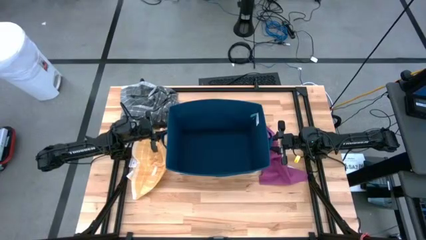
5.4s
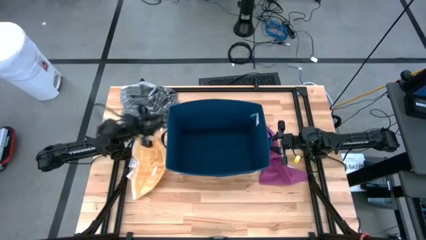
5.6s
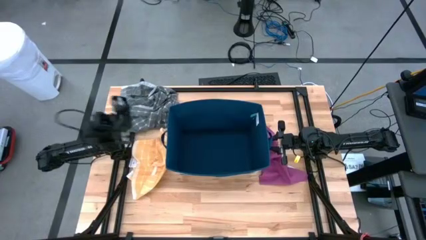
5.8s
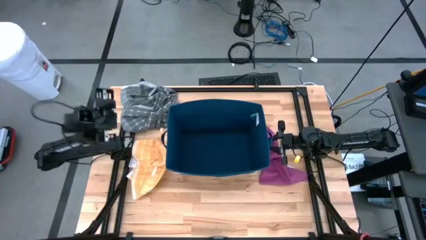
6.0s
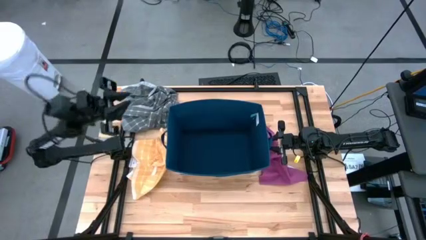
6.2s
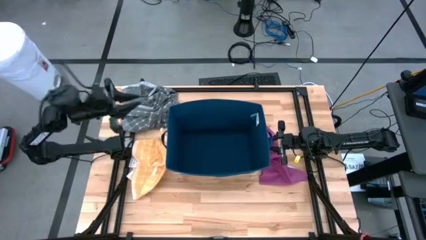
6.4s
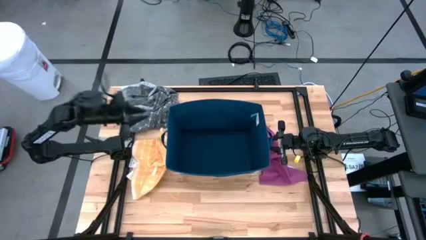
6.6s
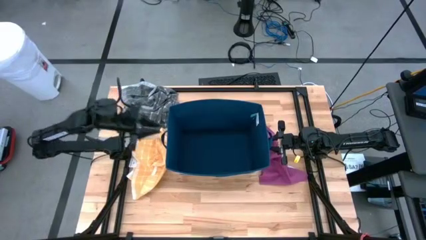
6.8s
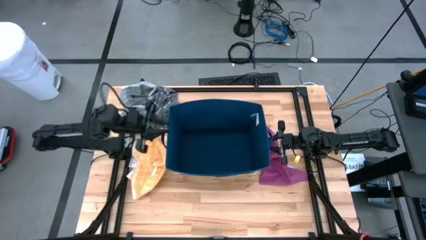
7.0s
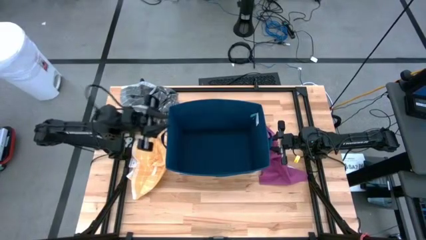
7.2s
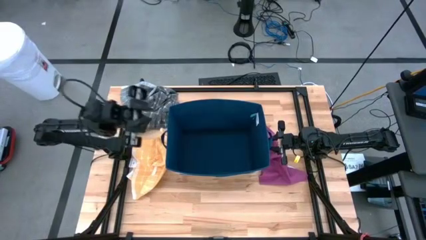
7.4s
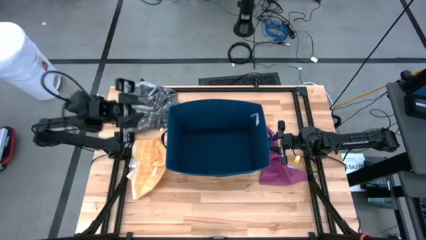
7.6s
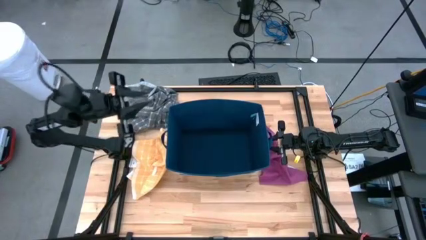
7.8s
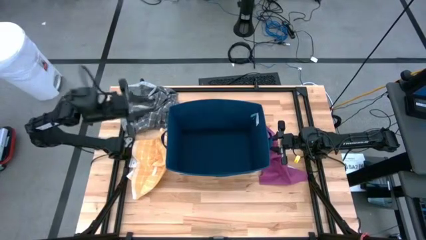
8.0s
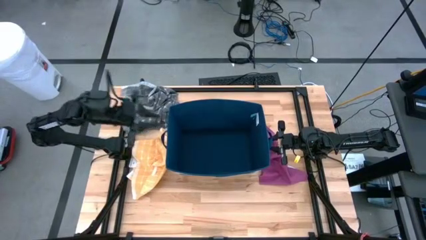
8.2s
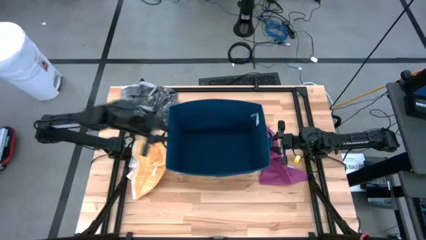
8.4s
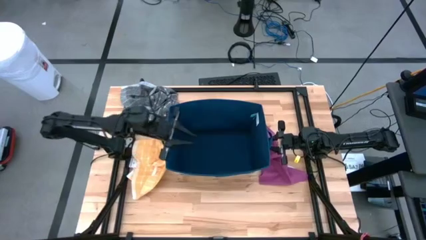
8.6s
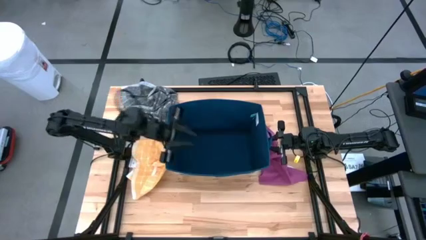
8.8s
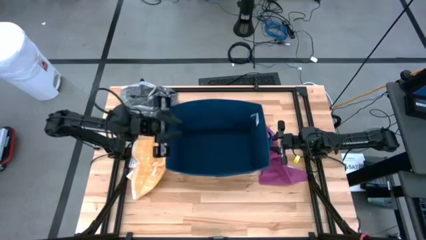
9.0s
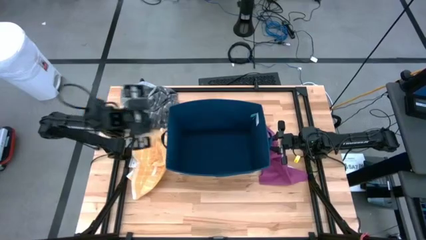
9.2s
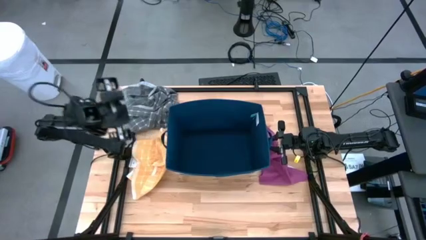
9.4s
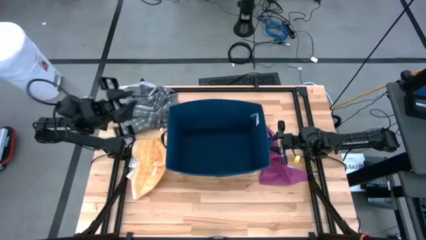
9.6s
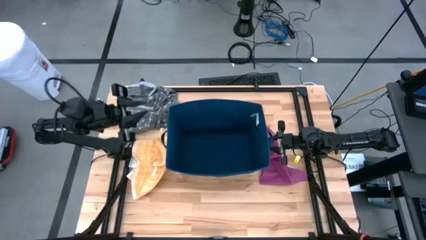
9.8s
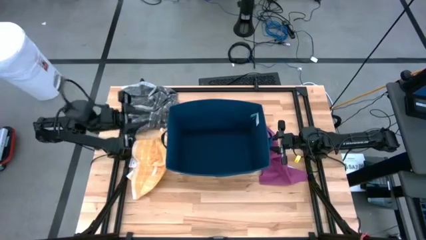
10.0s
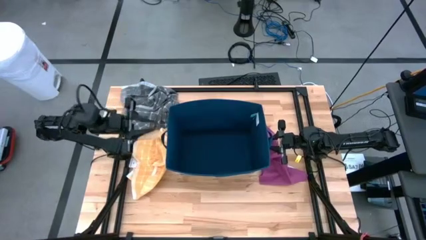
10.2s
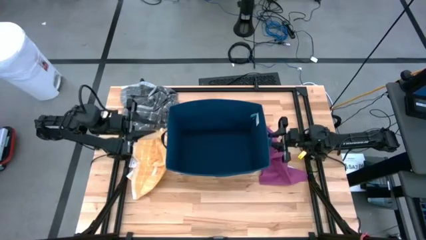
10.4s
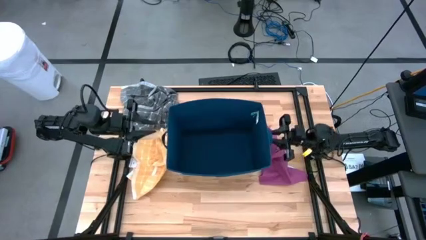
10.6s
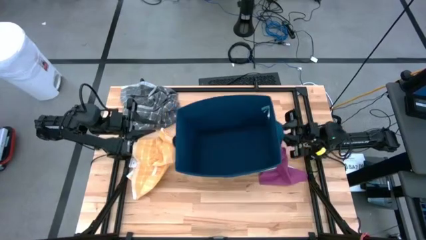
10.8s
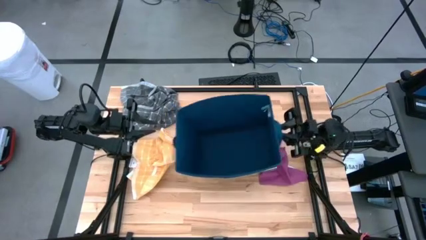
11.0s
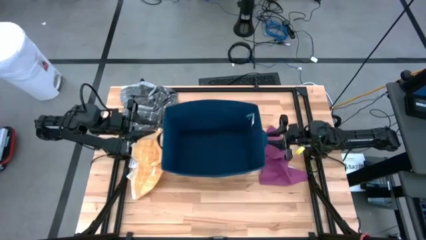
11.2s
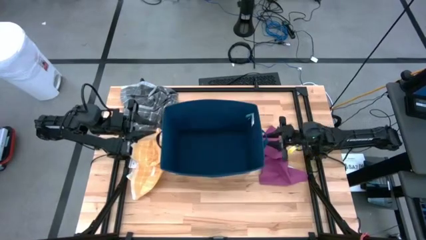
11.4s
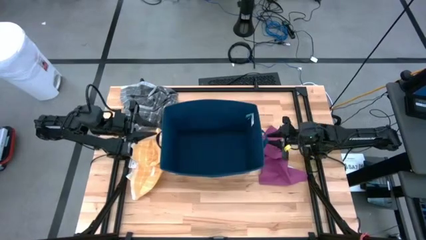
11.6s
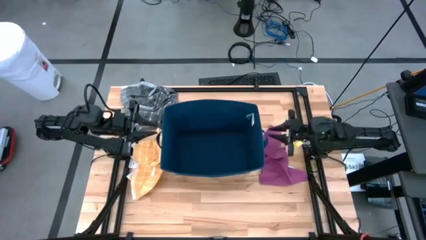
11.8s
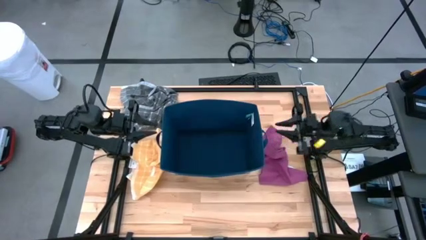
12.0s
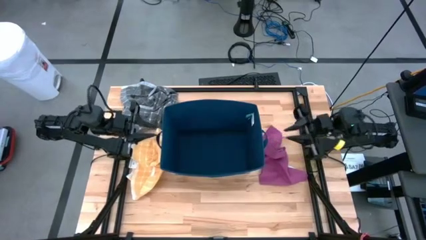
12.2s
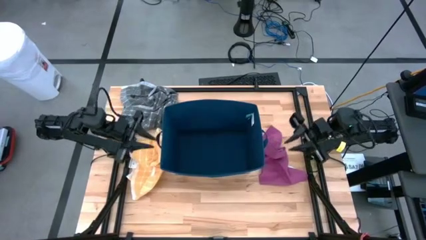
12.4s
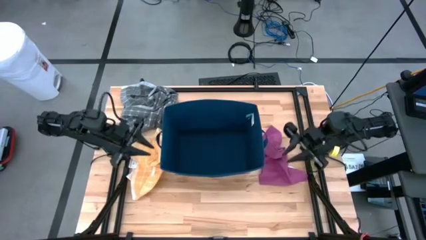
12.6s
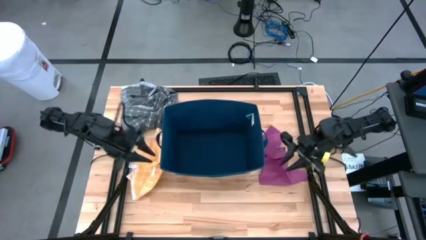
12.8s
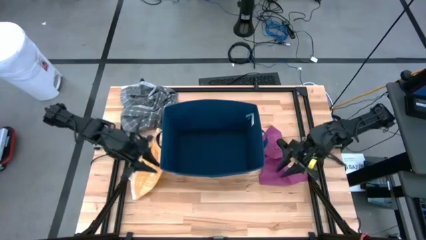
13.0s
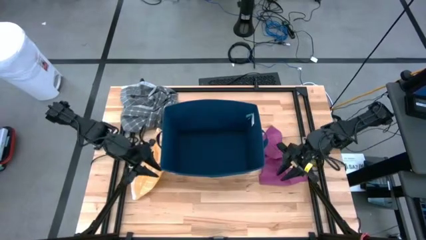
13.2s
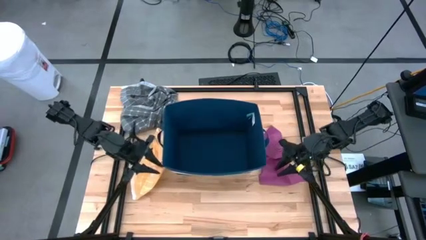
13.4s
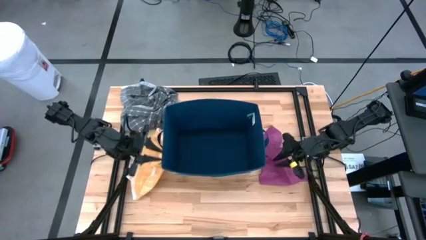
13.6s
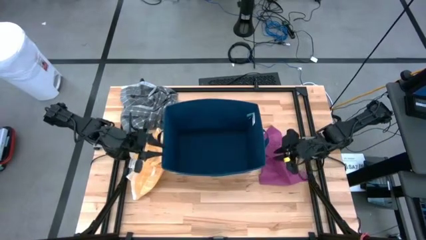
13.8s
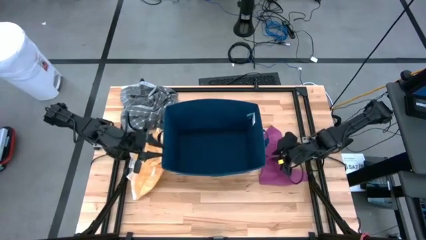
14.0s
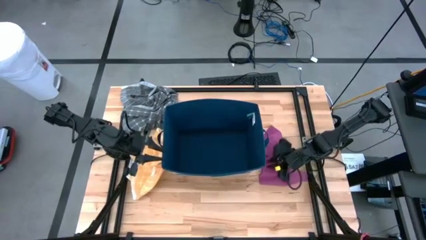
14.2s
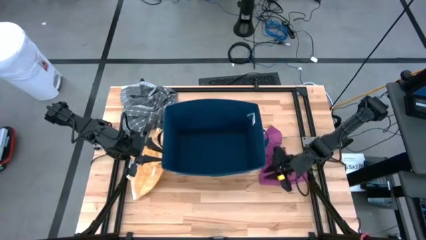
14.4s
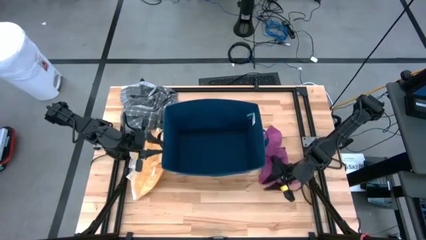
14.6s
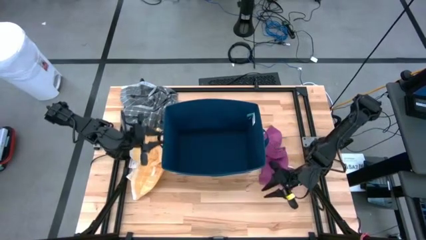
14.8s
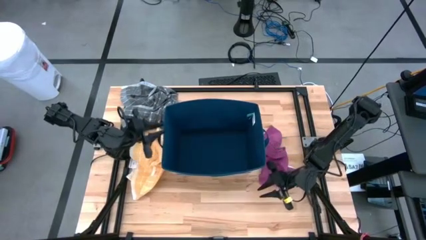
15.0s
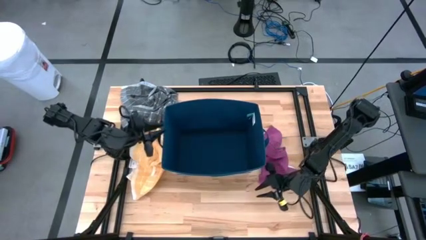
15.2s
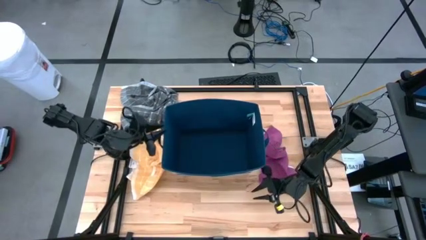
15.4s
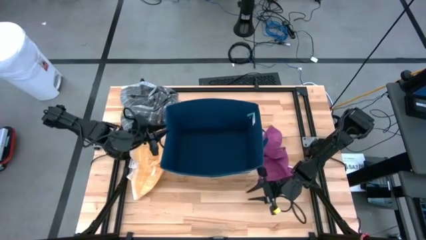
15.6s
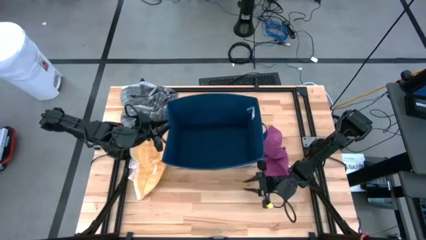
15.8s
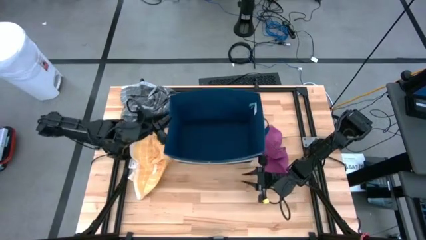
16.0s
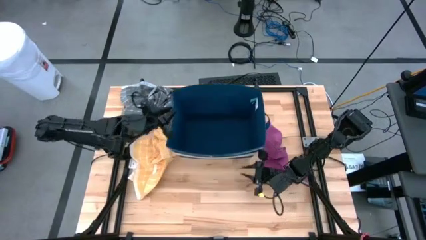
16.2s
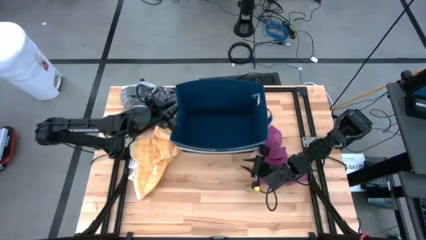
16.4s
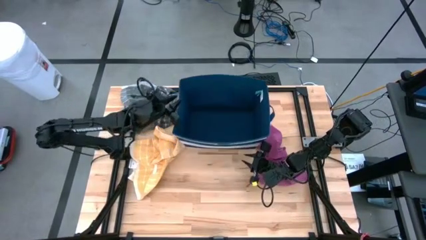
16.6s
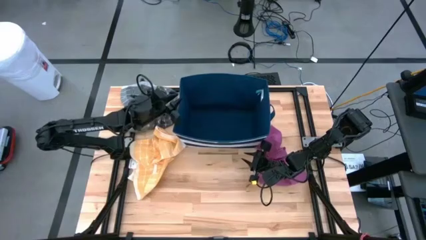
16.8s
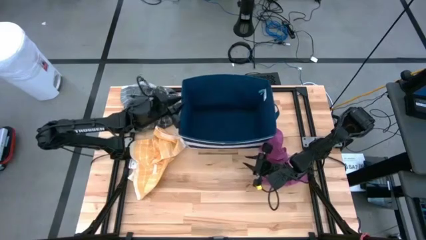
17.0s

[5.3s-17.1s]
Task: Fold towel
Move the blue bin to the top of the table

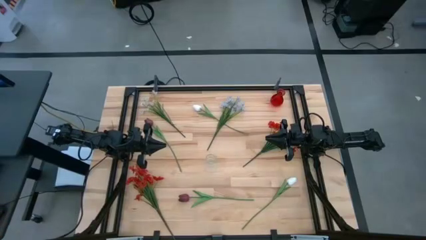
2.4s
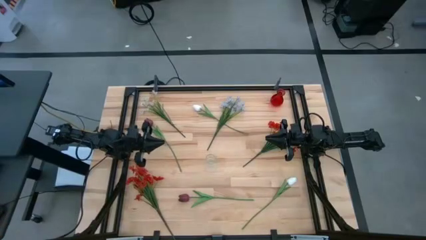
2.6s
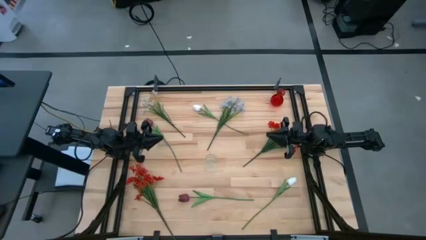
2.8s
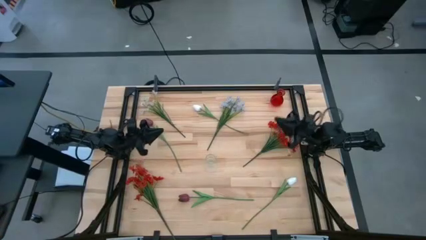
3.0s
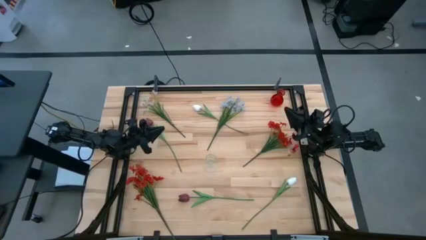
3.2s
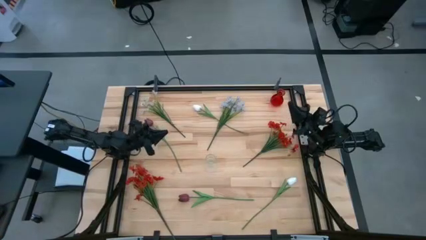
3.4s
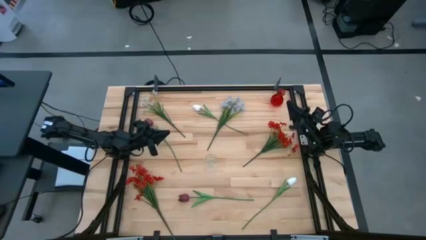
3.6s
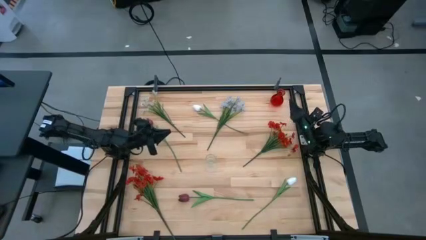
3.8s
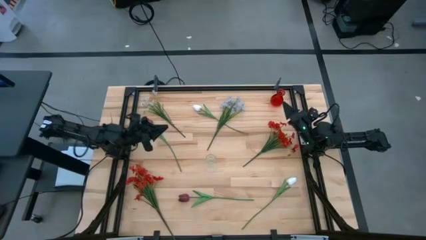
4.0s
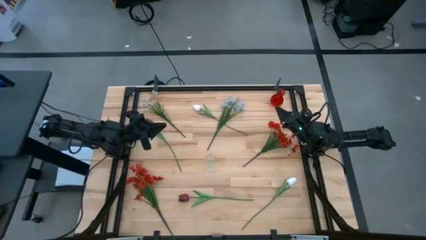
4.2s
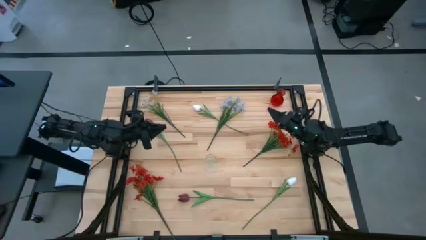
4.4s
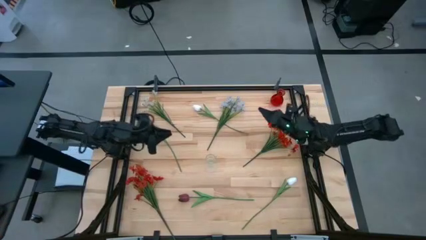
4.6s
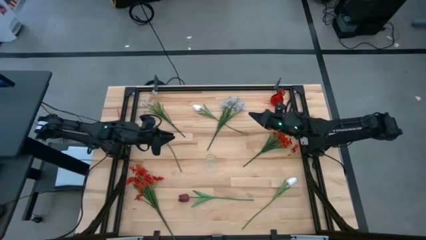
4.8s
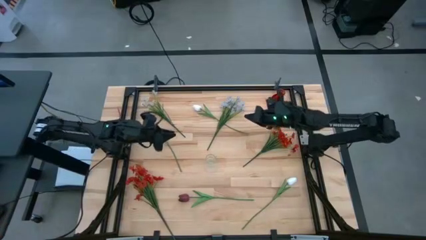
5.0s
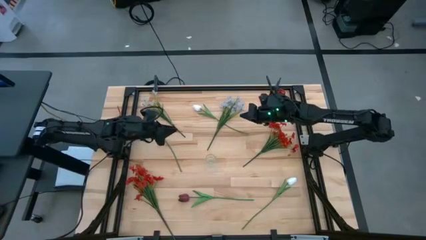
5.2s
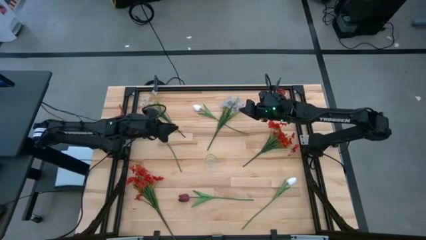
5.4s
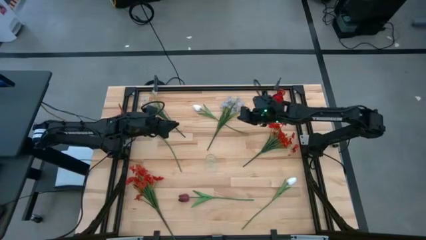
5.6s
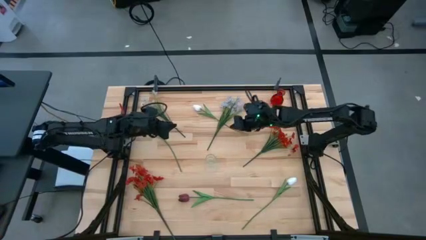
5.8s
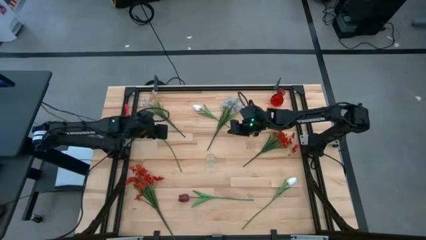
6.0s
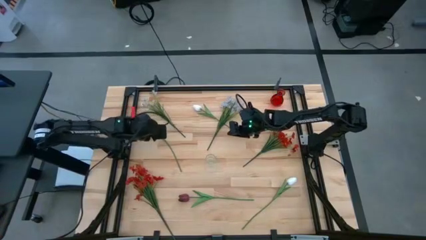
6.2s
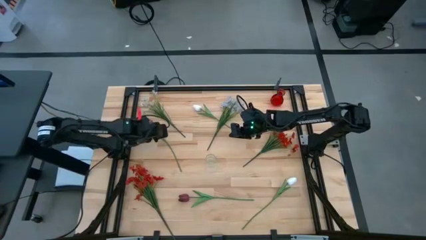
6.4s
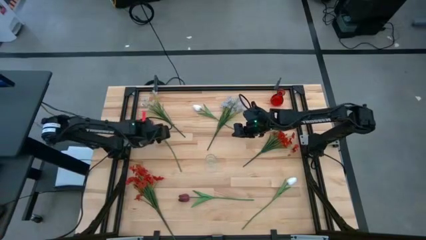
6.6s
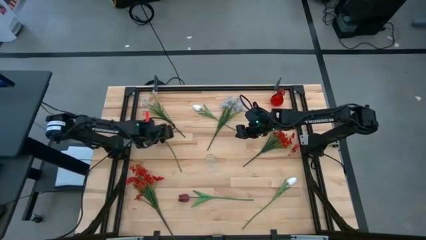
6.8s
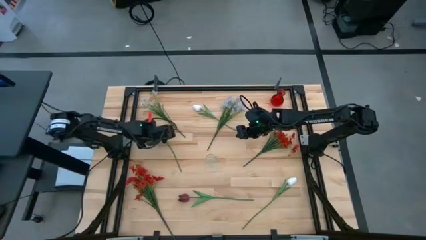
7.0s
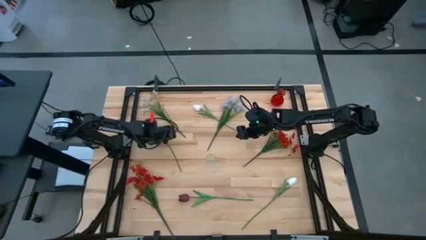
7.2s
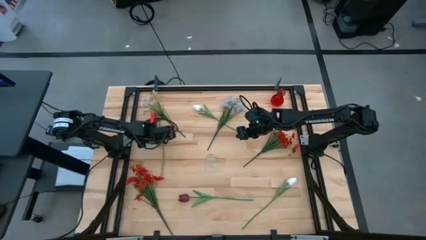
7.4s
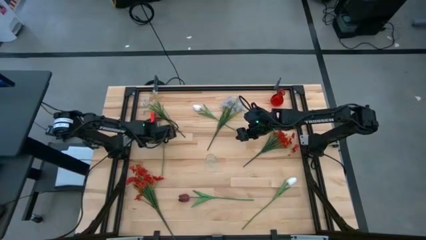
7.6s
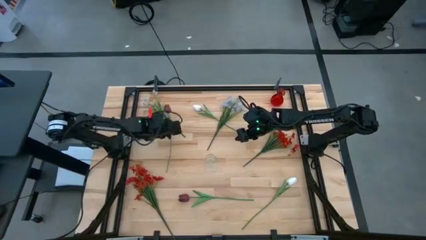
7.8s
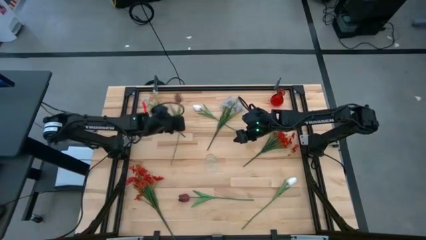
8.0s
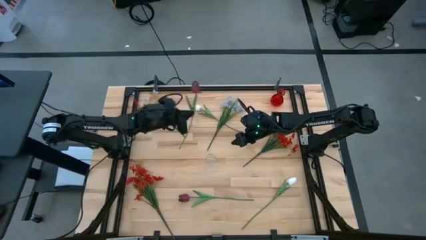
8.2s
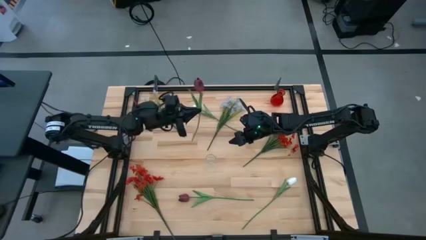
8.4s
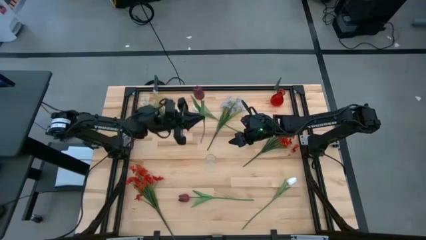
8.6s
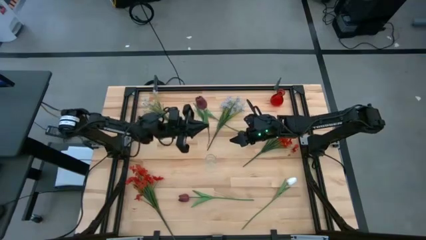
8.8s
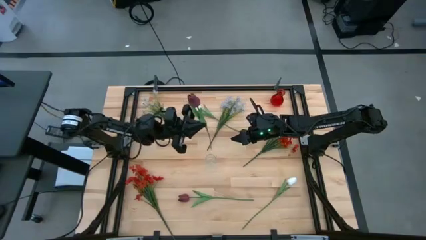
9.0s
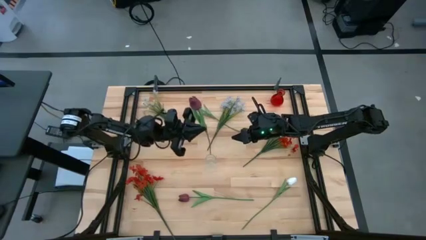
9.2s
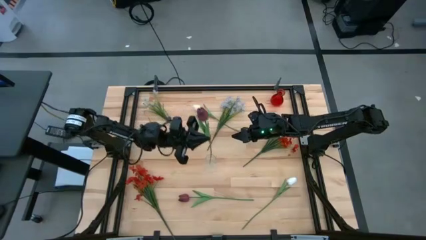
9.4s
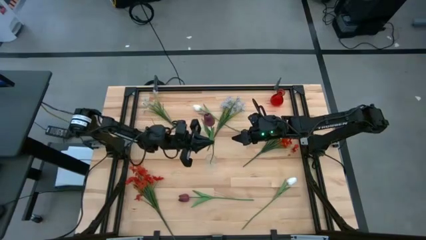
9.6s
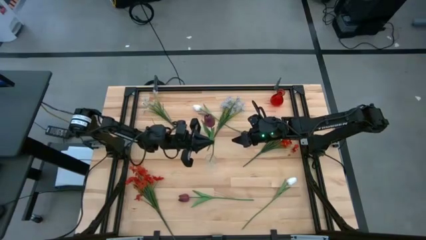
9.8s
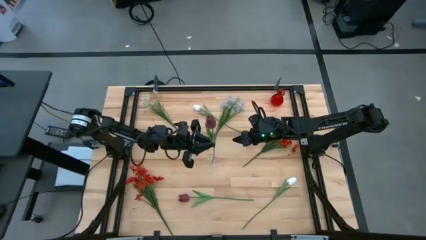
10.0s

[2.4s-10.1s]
Task: Sort flowers into vase by color
Put the top dark red tulip into the transparent vase
